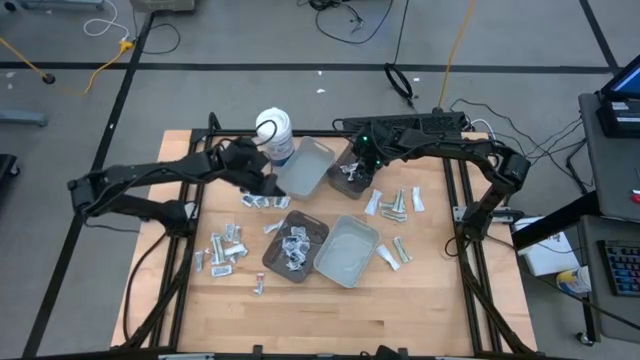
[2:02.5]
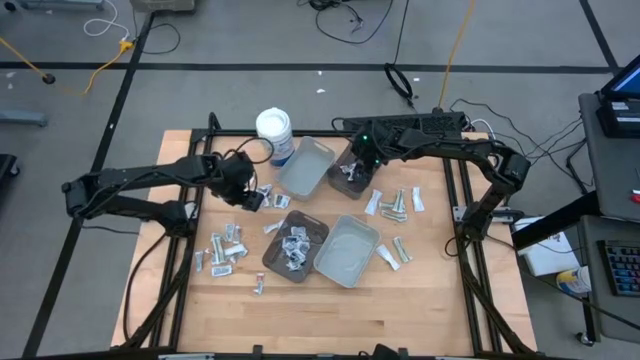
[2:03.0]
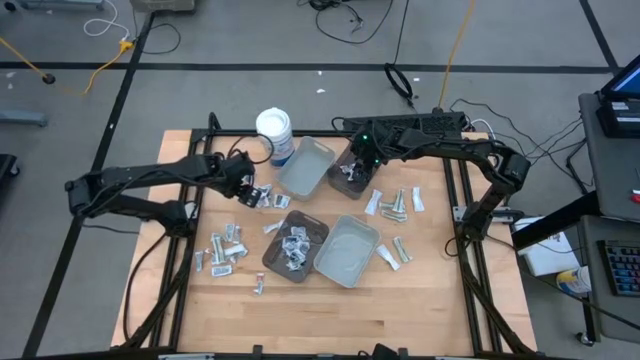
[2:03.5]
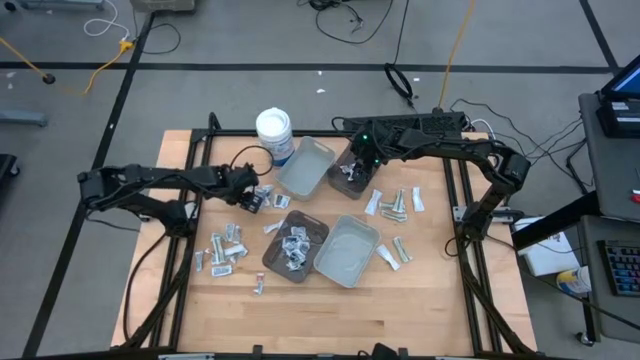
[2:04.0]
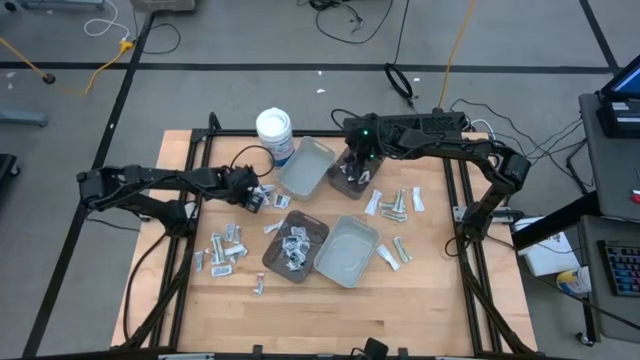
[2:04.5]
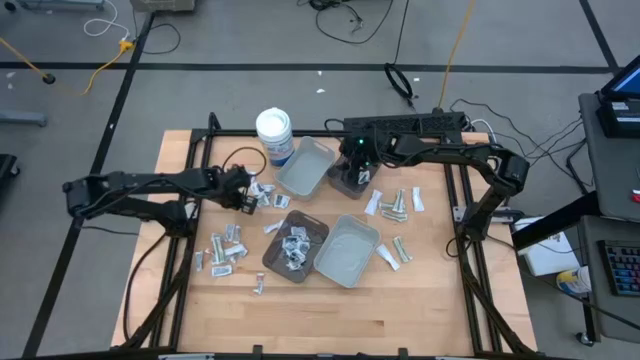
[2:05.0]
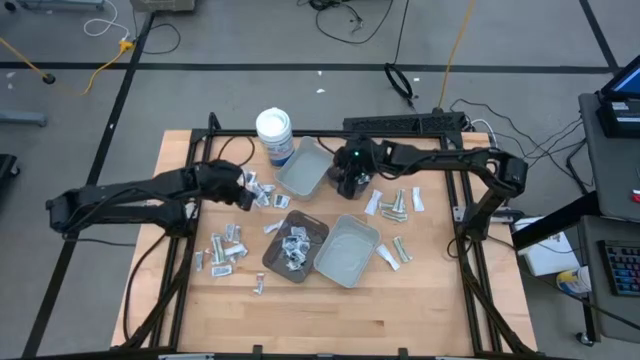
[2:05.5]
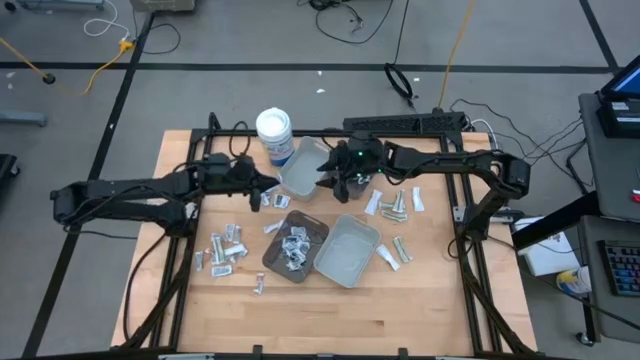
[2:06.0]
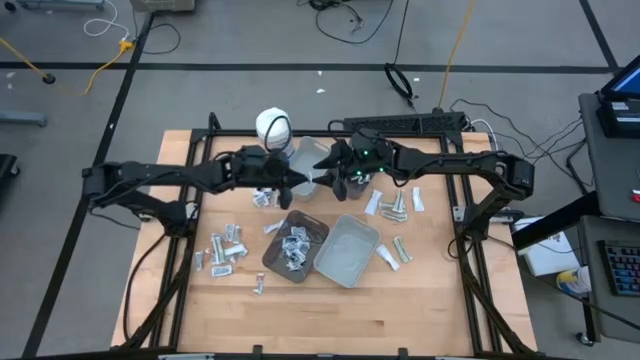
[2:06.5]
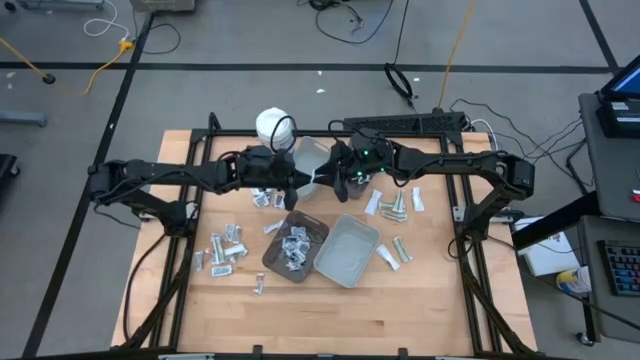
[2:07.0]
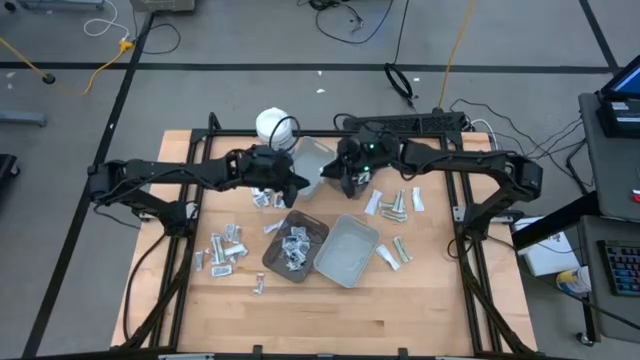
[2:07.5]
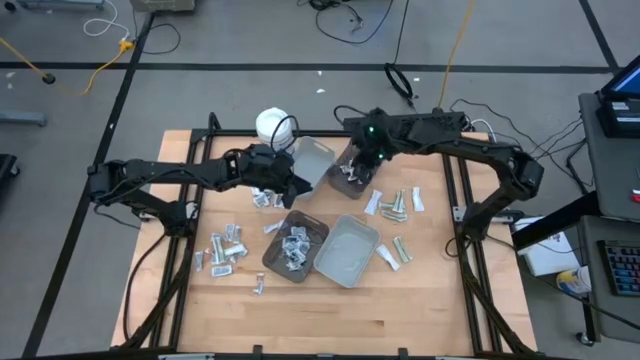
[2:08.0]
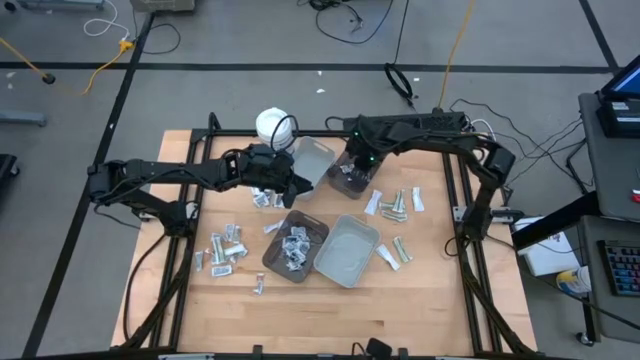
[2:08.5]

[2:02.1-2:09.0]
Task: Pick & Place First Aid Supplies
Put the black towelette pack into the top black bin

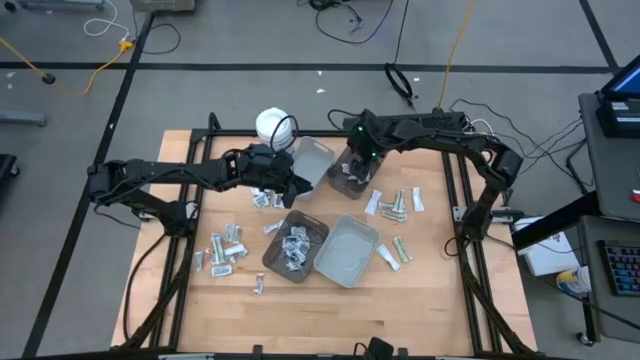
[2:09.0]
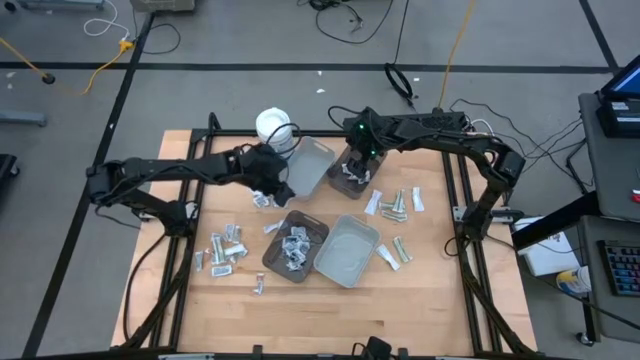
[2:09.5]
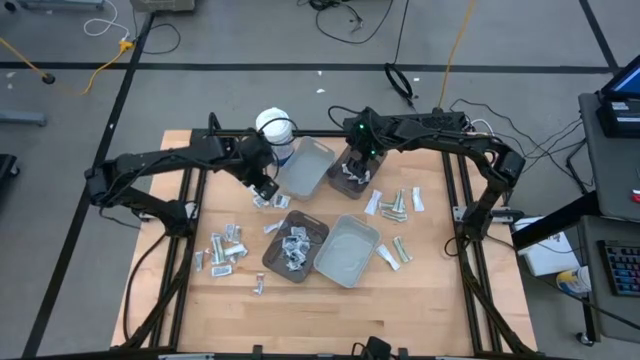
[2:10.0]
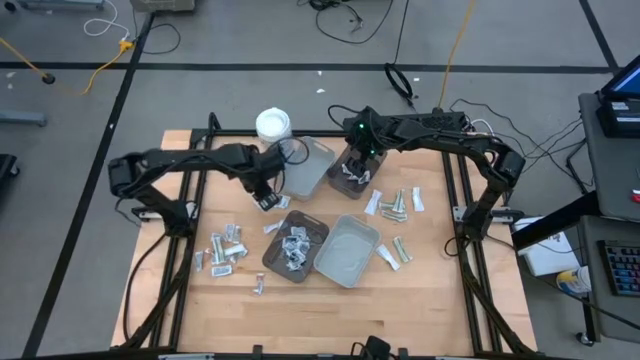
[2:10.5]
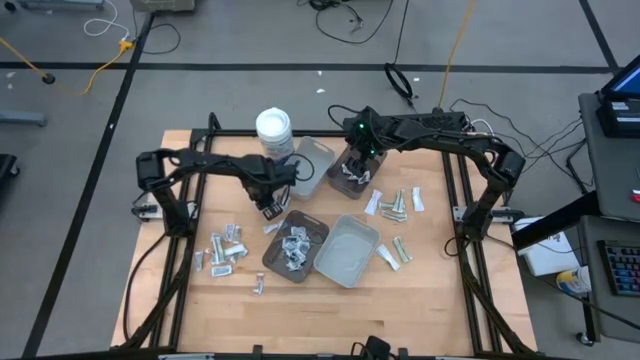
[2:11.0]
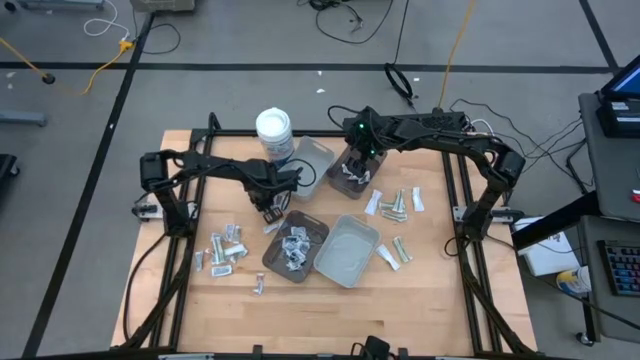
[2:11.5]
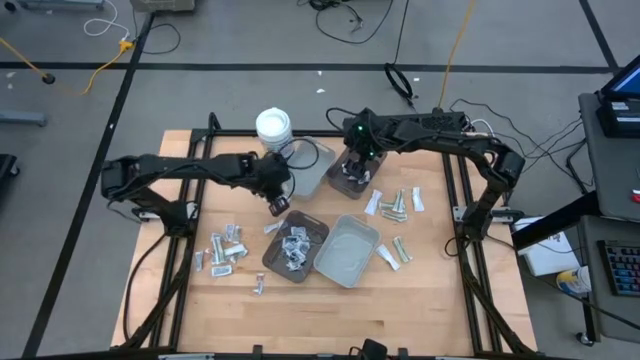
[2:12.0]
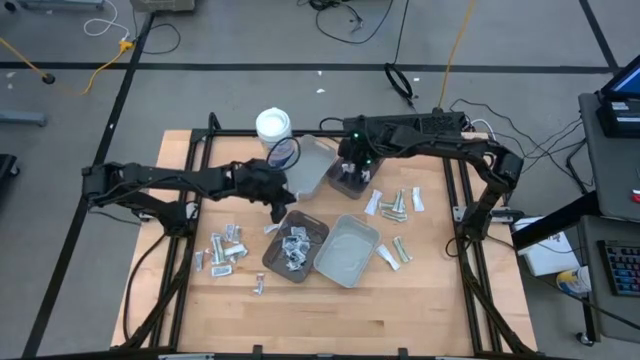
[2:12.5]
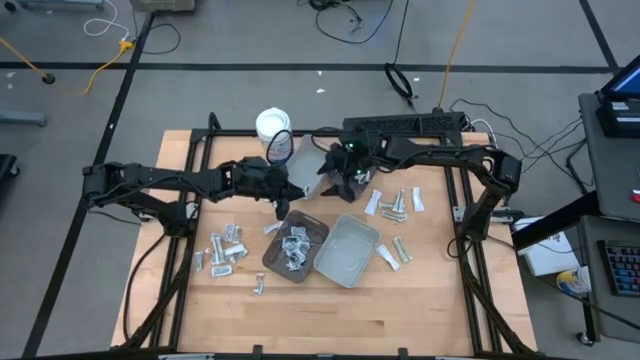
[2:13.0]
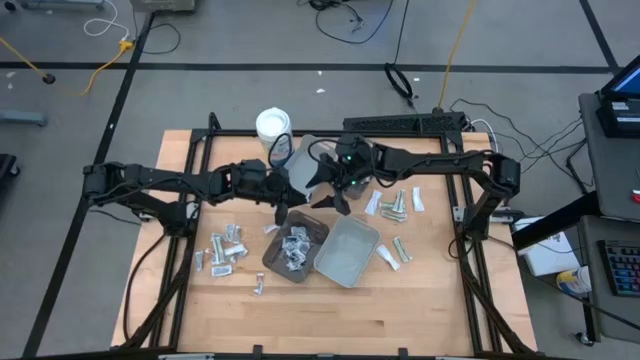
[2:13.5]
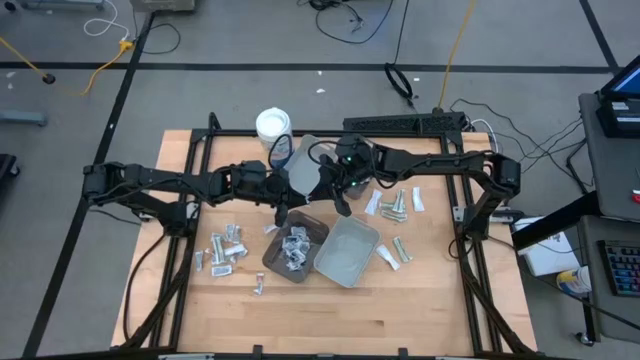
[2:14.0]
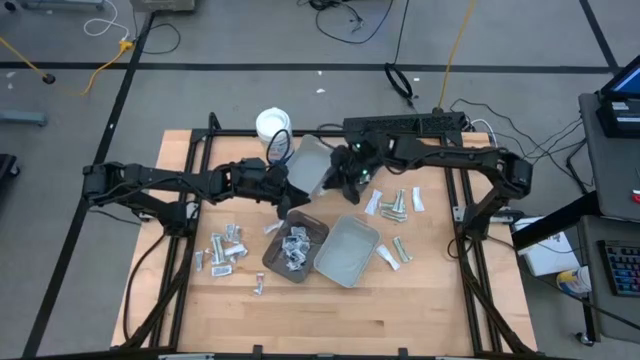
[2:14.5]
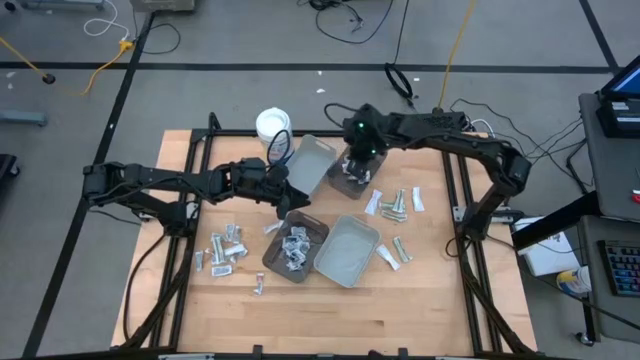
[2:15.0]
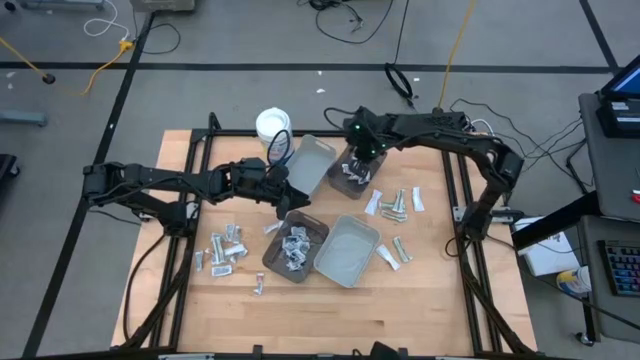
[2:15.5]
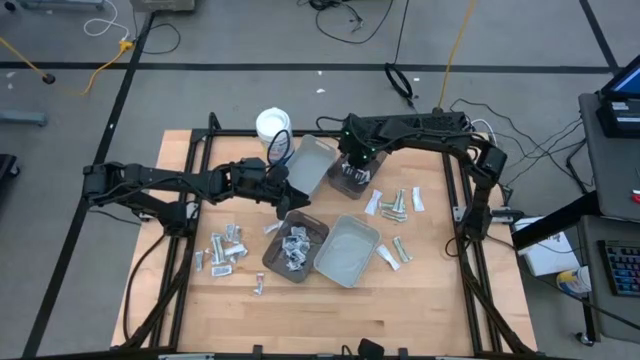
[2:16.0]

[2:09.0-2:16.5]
Put the black towelette pack into the top black bin

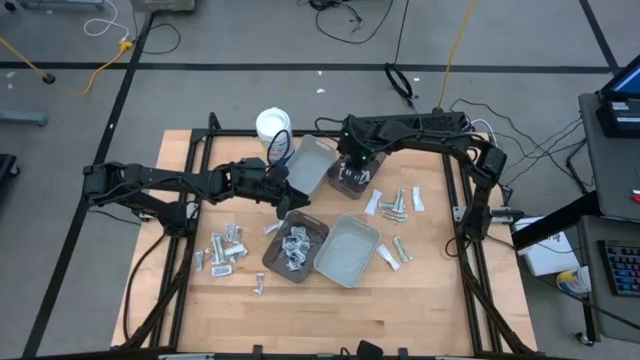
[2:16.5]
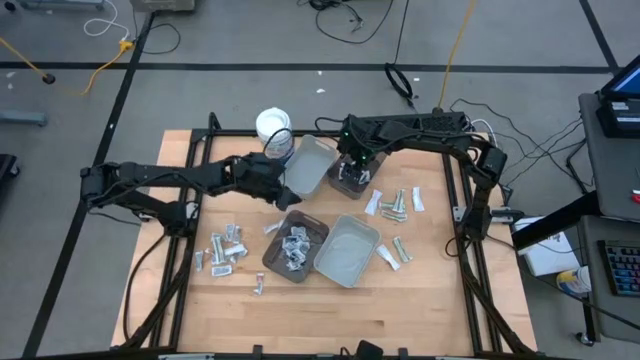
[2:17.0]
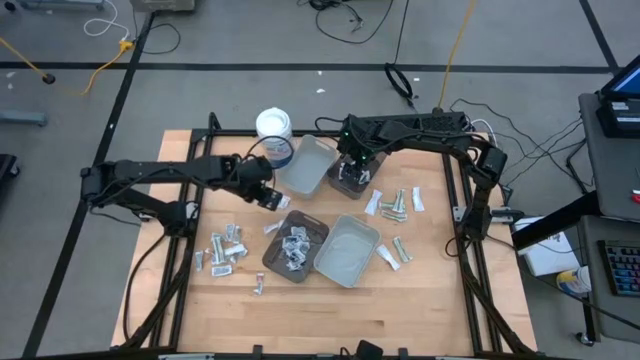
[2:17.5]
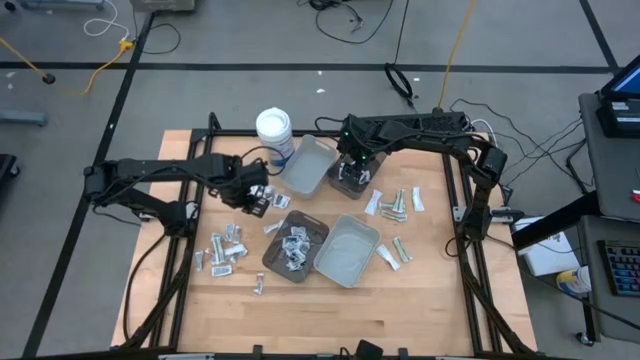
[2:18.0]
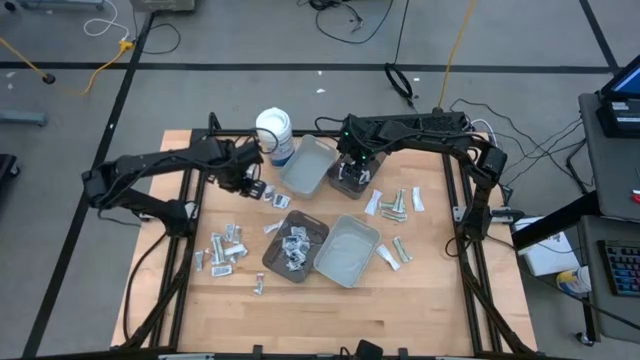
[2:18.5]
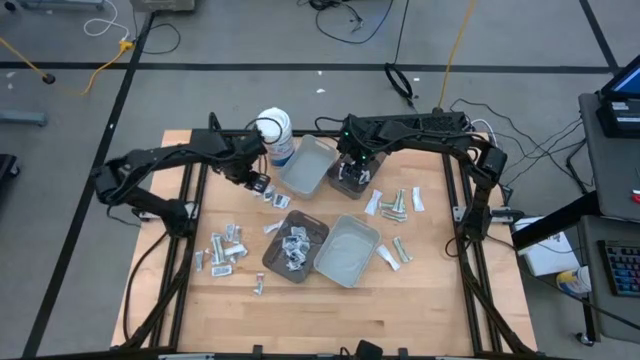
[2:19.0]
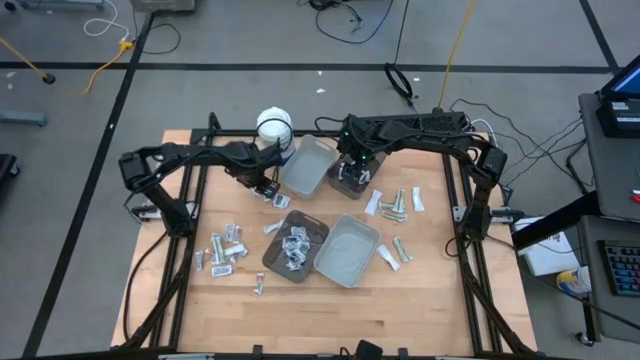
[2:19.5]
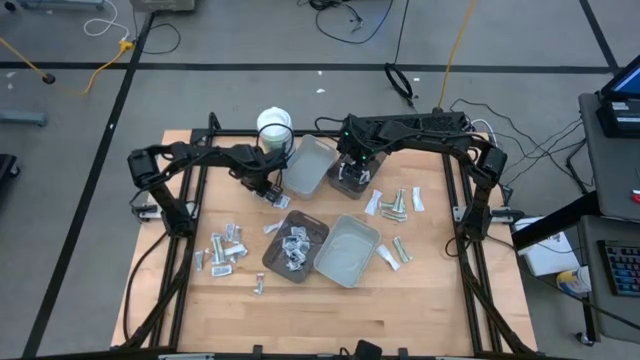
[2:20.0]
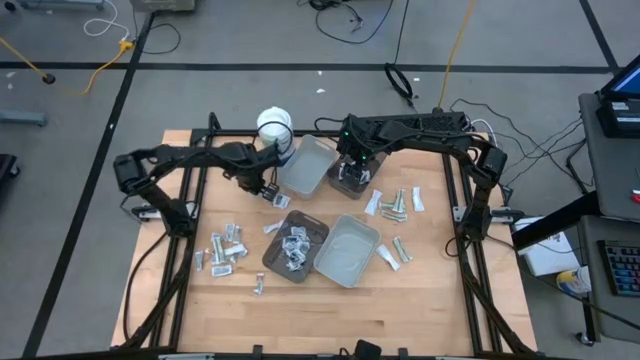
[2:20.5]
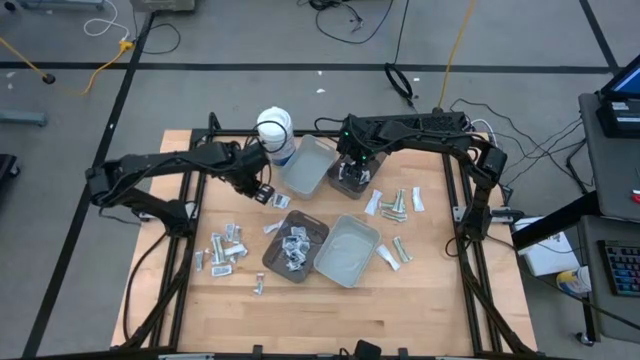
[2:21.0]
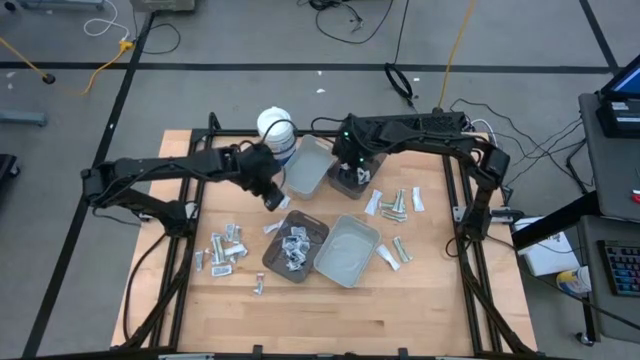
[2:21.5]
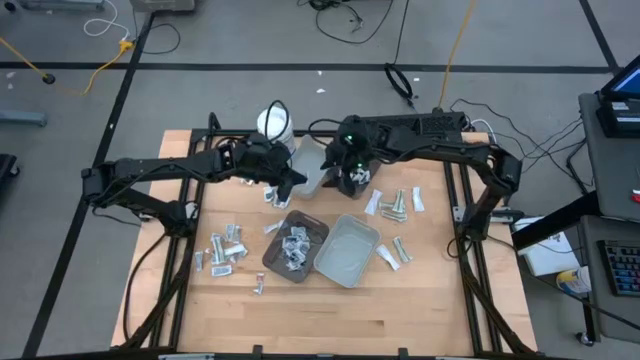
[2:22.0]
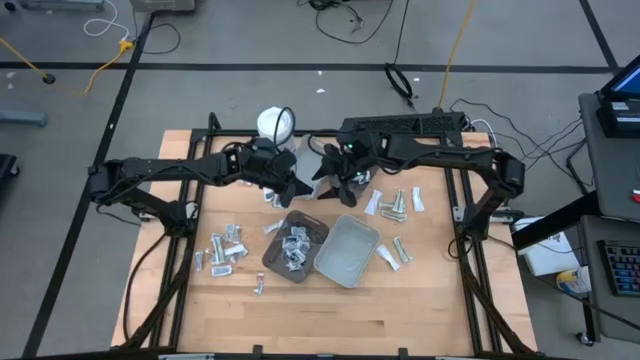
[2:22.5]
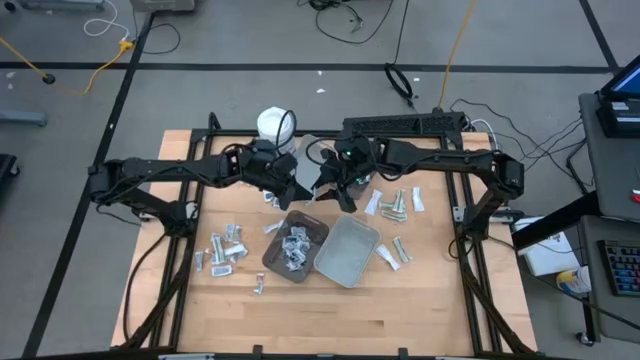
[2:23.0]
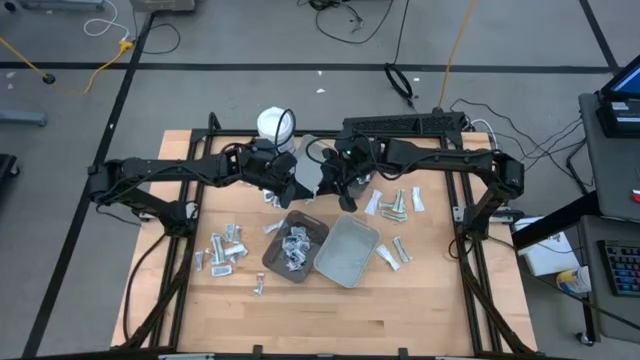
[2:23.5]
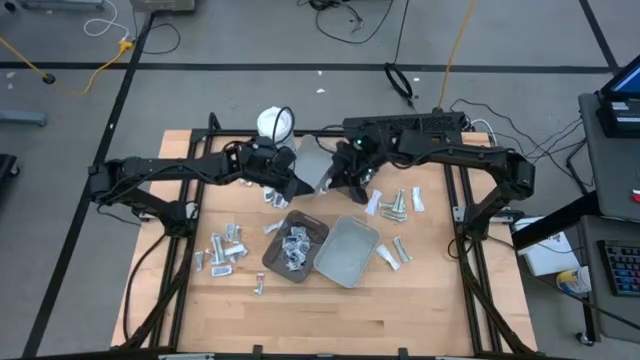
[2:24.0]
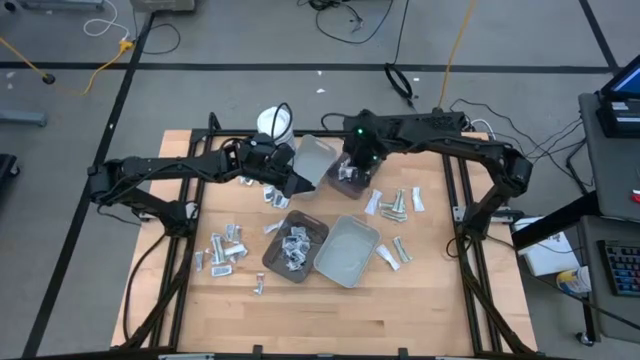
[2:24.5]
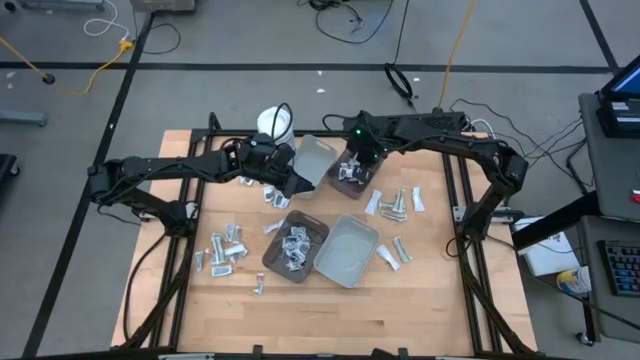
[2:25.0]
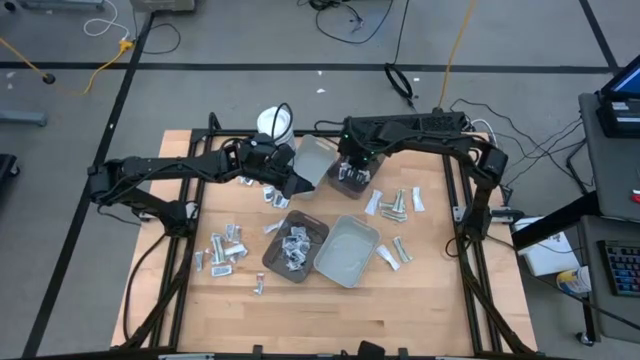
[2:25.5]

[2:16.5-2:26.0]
Put the black towelette pack into the top black bin
